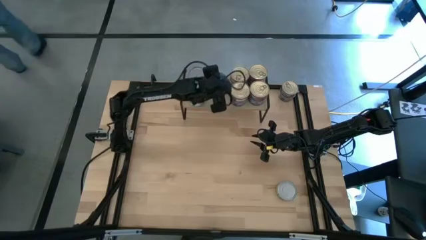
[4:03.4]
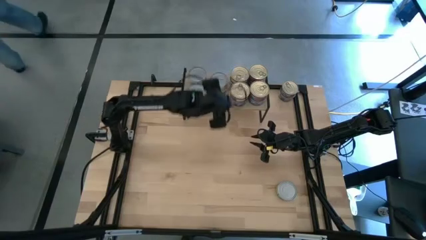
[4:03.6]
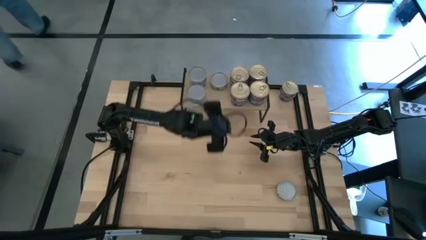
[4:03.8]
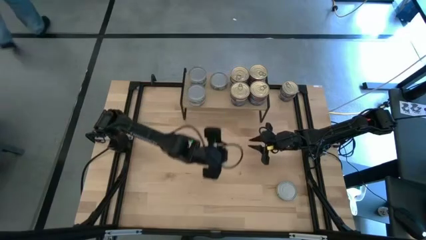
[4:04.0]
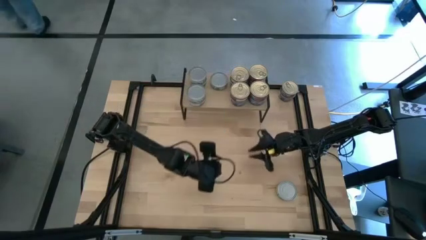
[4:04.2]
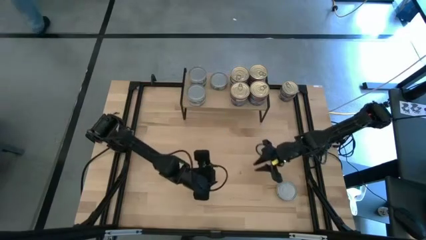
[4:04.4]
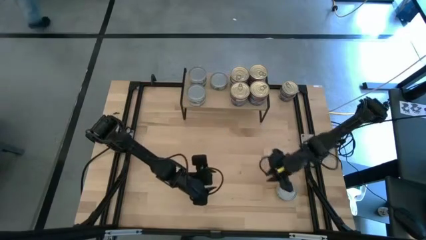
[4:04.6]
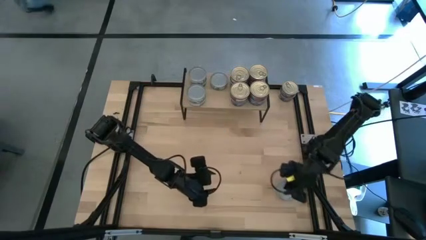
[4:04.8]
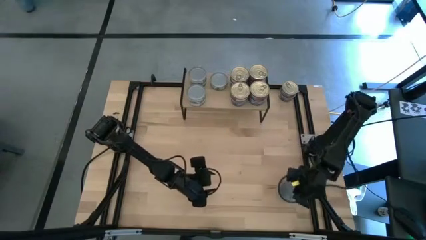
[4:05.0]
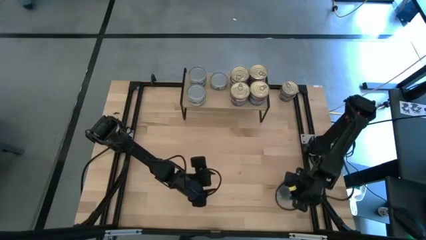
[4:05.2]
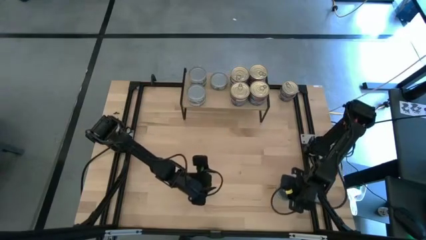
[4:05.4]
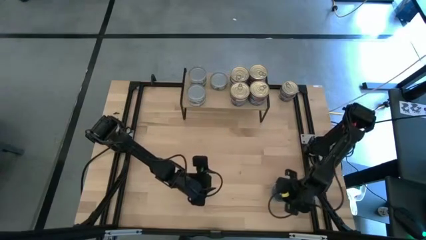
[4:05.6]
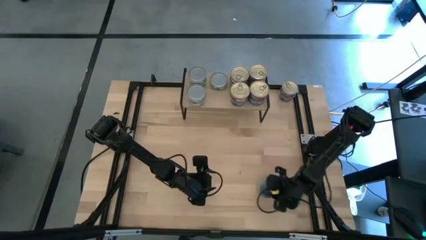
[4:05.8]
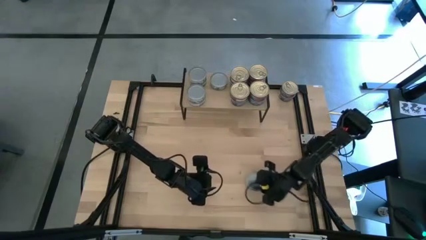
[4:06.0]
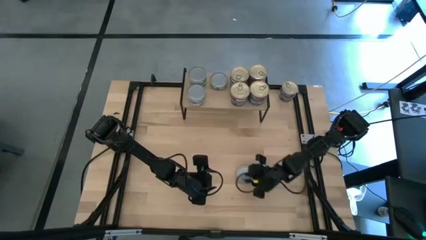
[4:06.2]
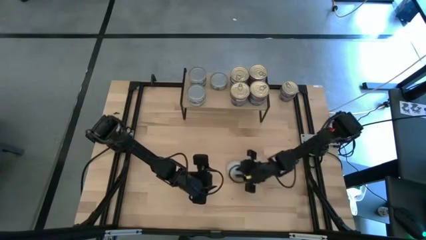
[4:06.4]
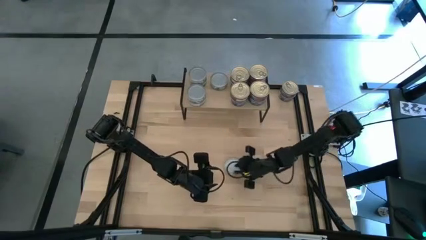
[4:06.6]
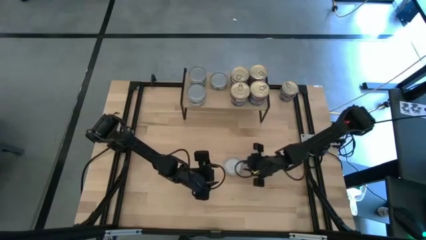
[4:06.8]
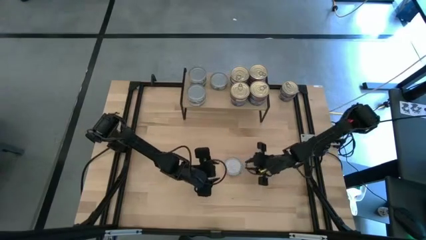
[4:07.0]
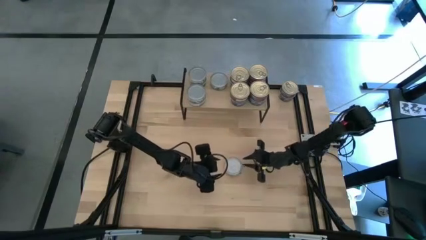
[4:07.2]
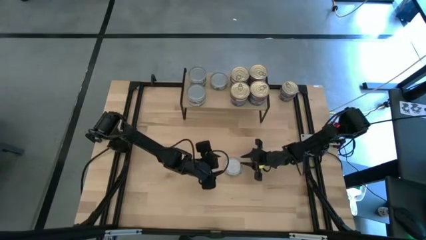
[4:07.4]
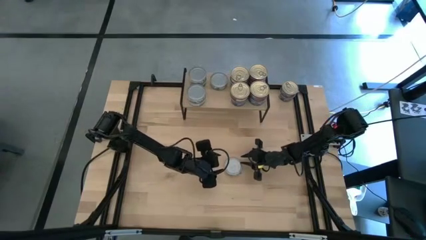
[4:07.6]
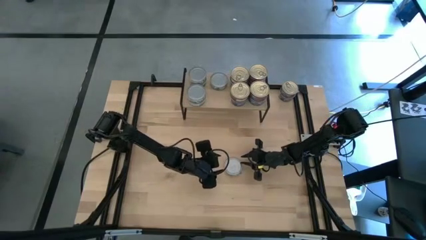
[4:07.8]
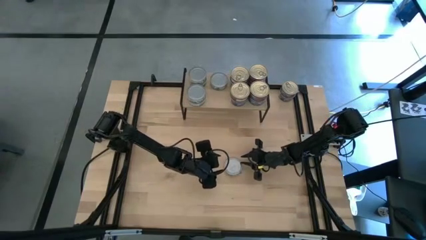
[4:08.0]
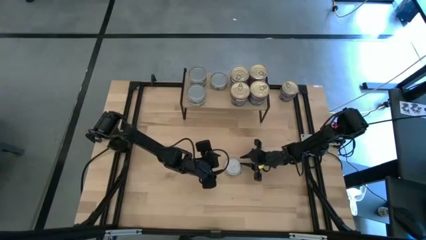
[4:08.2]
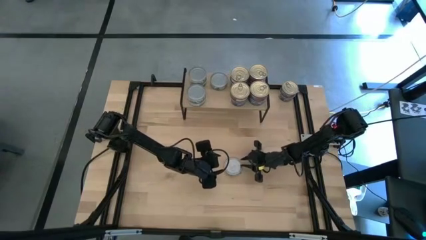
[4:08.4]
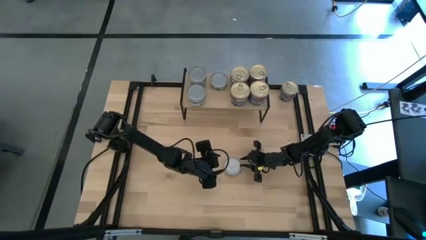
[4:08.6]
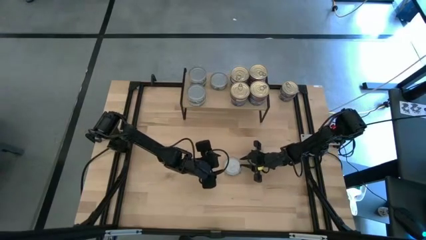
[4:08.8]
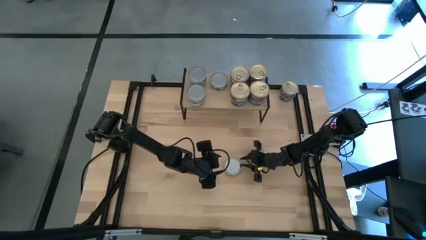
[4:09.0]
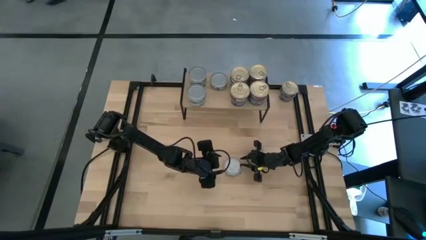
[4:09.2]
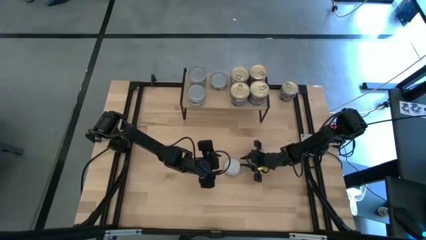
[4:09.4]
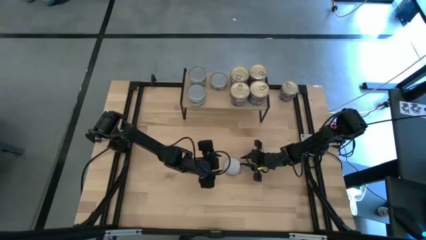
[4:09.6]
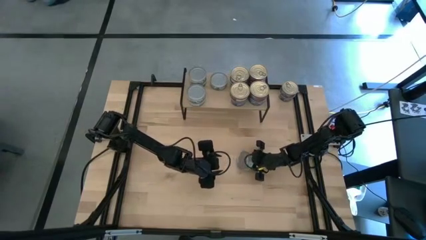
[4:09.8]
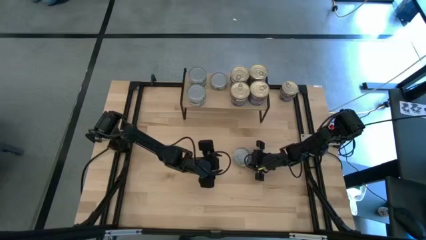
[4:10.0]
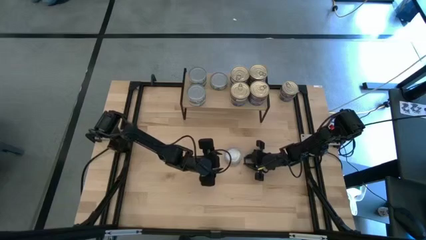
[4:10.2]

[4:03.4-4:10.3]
Task: Stack canned seafood by type on shelf
Stack the green white tuna can with the green white tuna can on the shelf

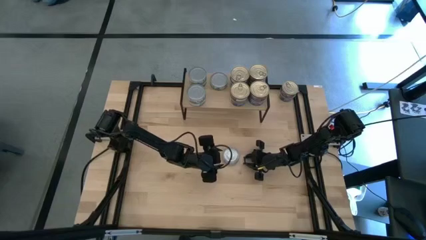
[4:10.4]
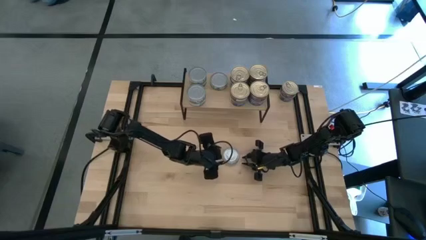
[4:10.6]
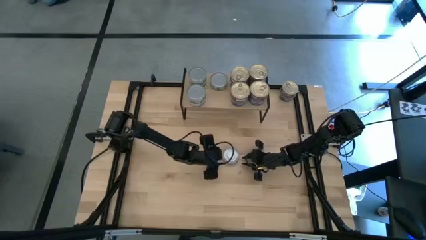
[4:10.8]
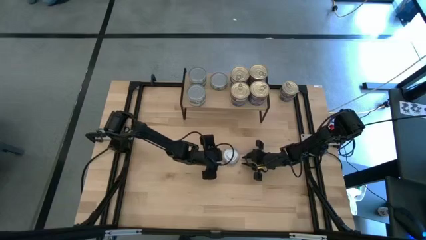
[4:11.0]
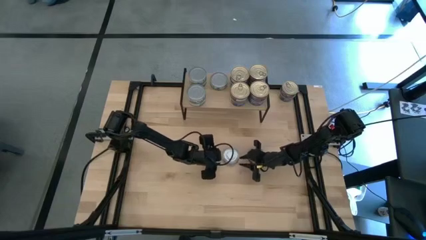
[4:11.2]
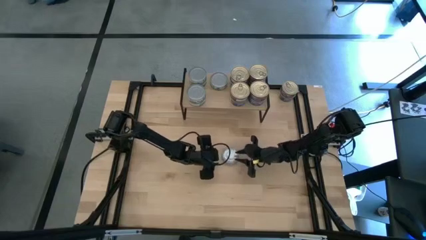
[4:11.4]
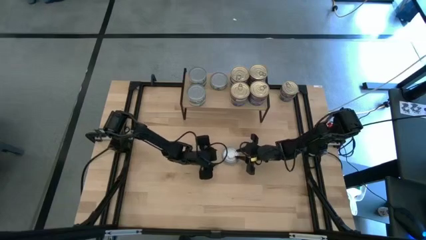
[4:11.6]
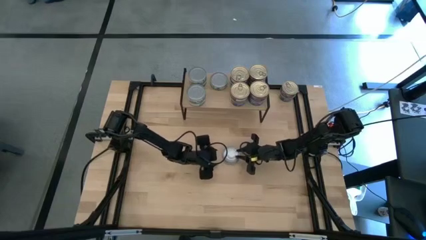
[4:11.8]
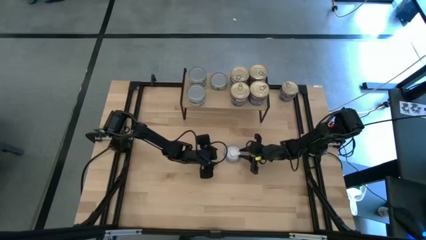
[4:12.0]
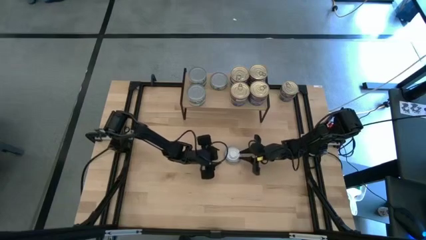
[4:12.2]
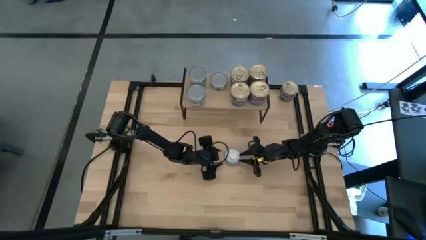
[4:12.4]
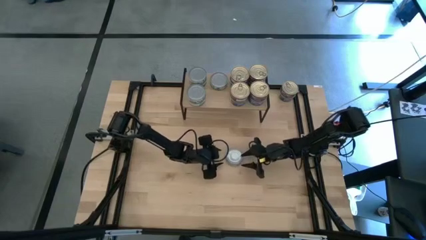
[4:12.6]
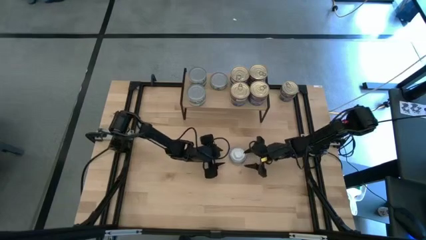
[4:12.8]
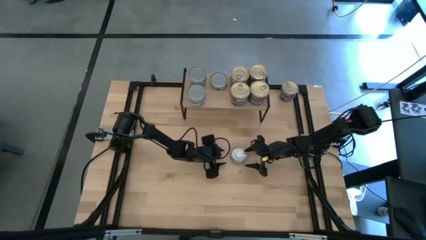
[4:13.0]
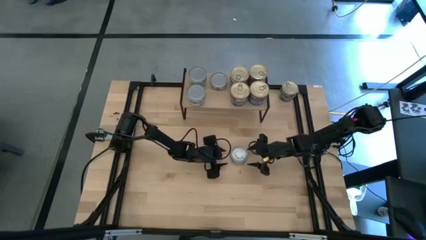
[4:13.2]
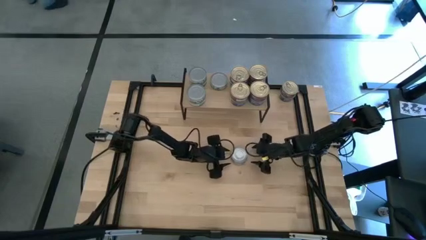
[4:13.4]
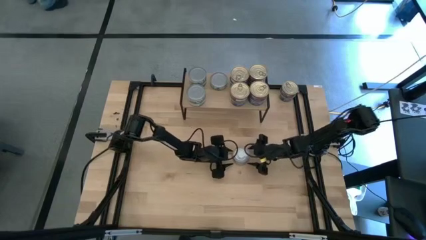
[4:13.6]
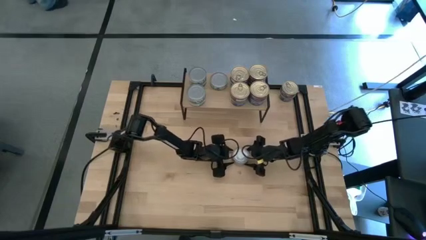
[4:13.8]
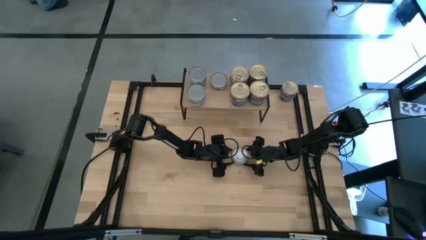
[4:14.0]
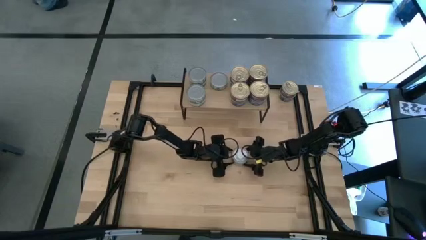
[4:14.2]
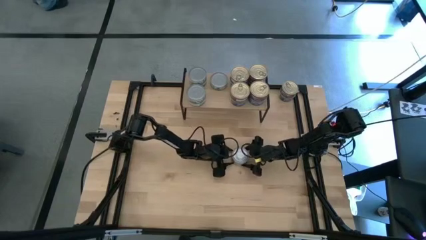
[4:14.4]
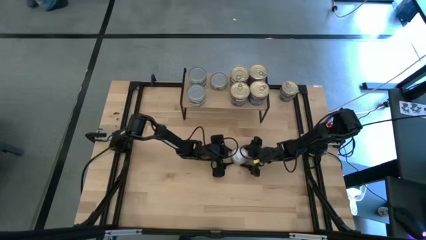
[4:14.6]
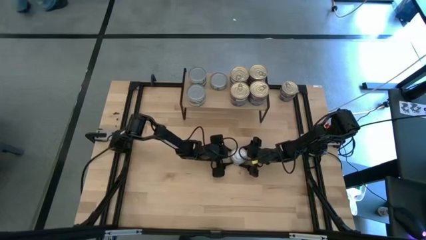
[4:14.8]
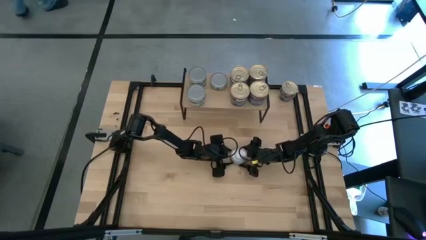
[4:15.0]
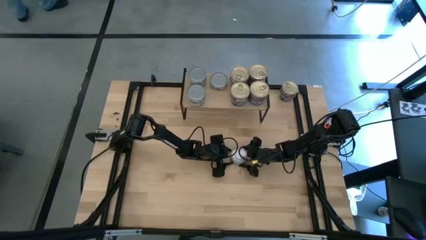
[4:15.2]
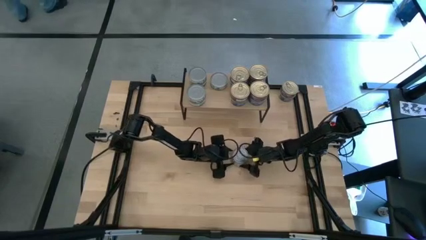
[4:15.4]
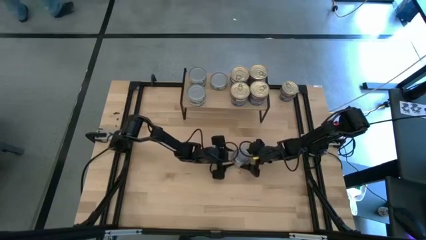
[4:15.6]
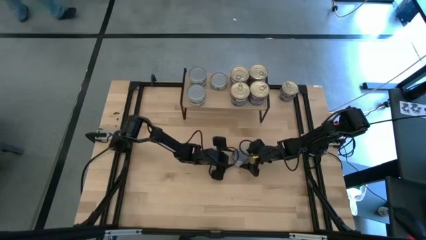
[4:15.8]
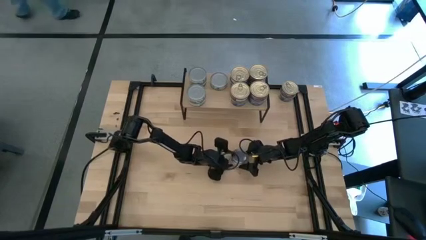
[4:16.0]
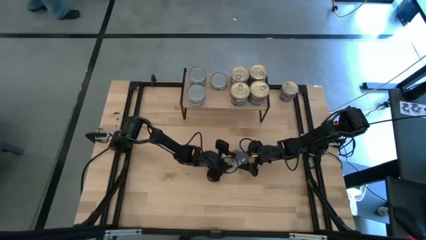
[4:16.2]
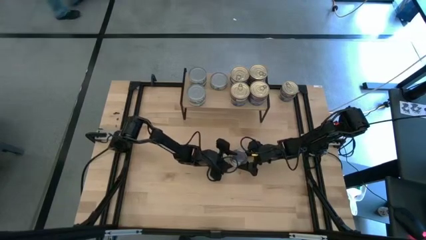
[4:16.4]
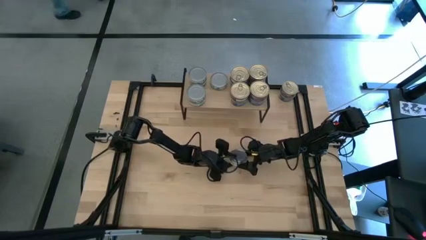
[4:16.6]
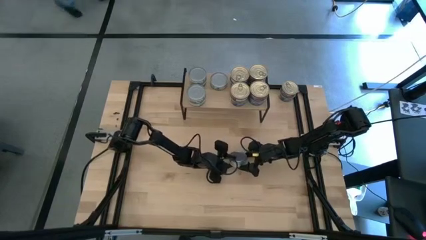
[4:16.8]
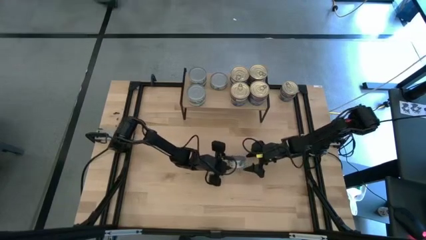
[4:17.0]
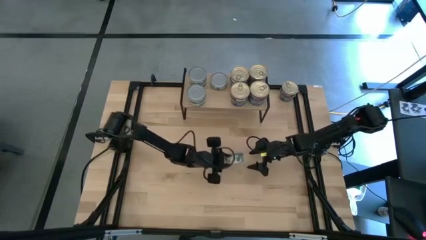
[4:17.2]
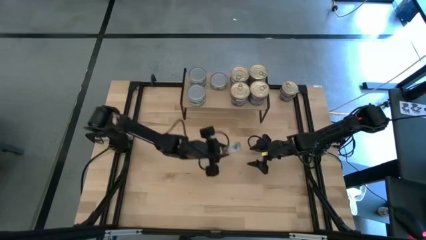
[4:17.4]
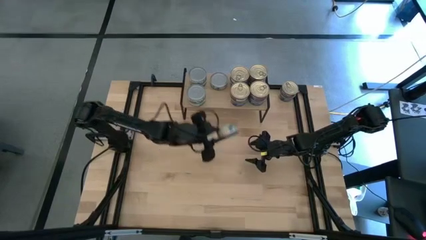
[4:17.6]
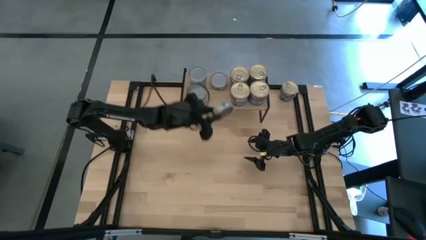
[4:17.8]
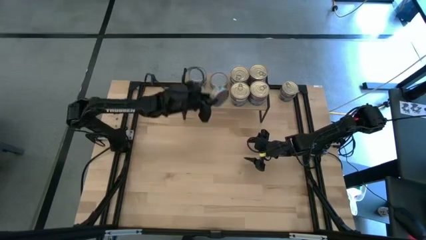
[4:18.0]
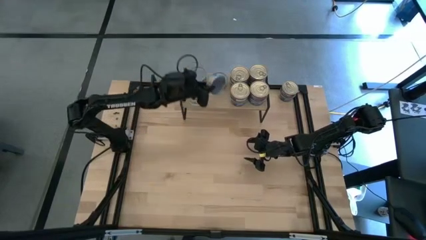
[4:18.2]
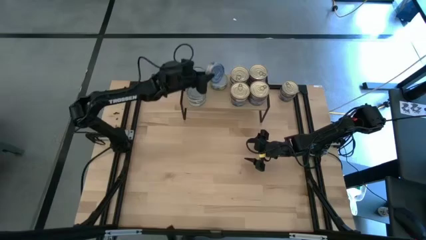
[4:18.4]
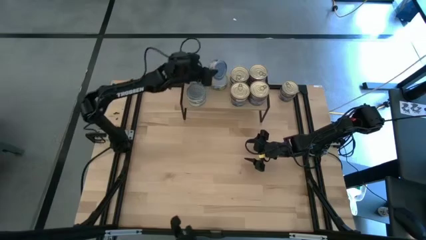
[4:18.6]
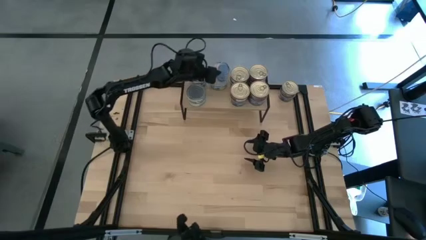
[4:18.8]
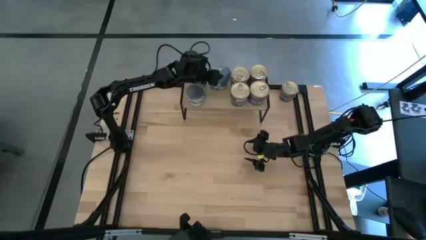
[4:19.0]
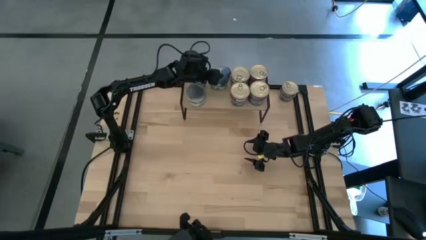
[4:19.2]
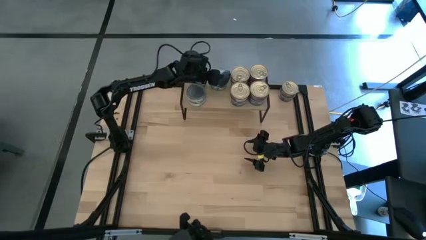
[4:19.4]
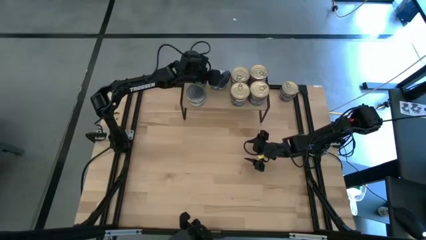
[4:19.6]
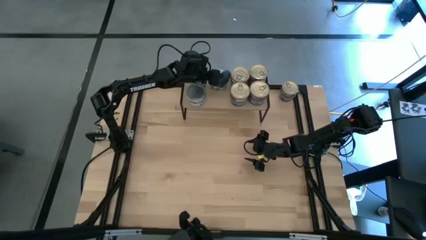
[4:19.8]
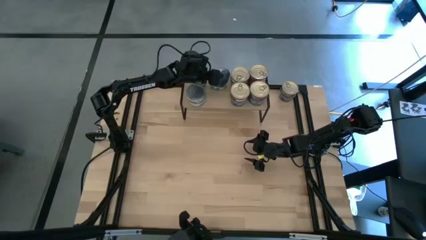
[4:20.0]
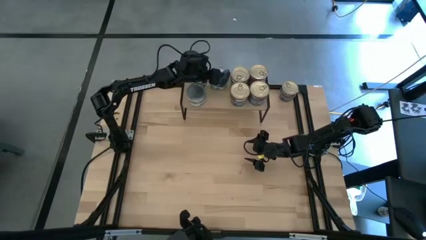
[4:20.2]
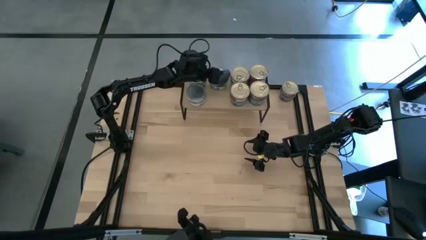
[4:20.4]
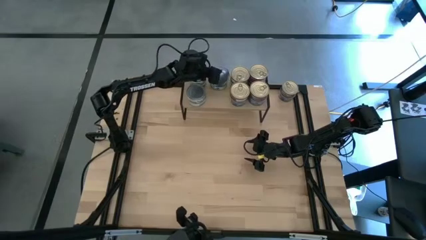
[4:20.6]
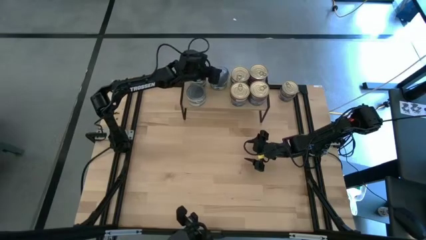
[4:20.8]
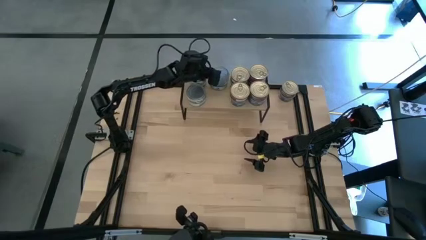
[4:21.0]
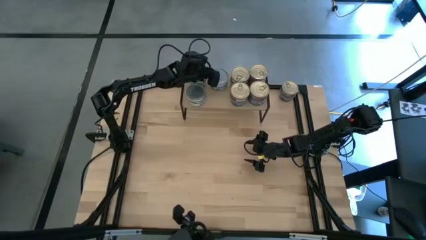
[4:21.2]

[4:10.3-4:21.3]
Stack the green white tuna can with the green white tuna can on the shelf
